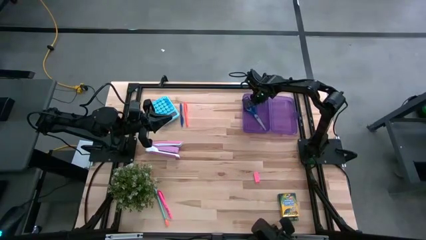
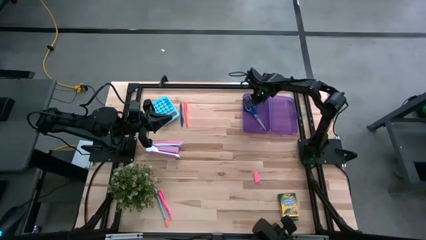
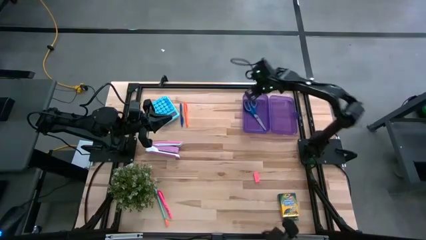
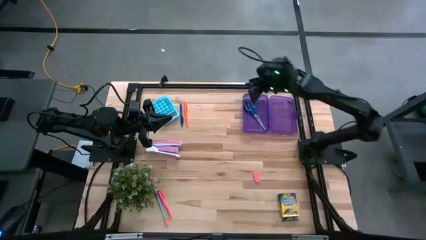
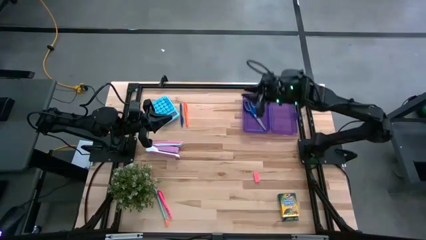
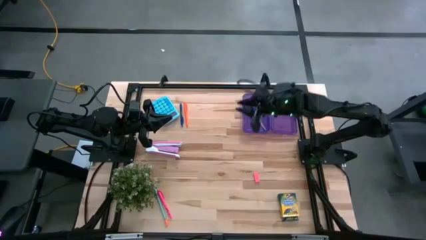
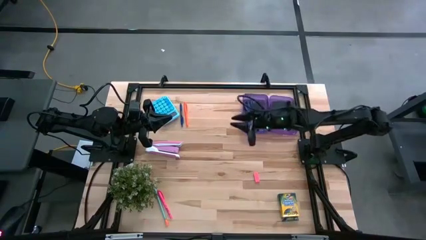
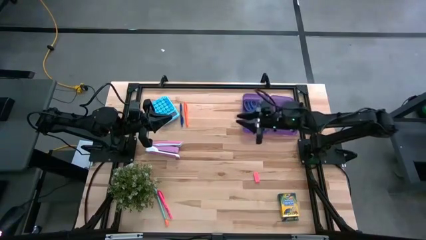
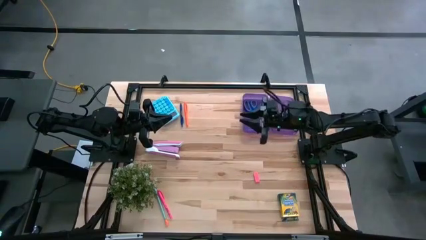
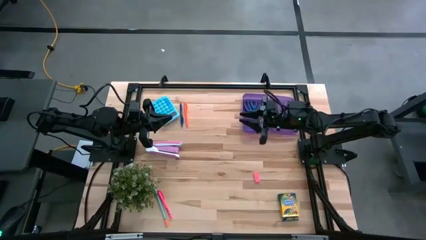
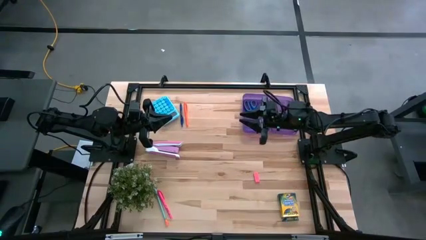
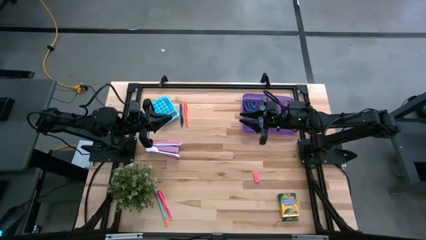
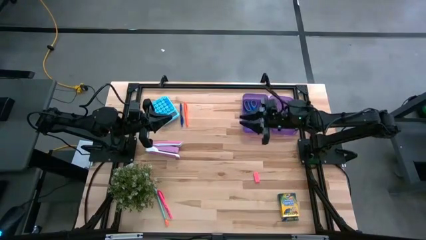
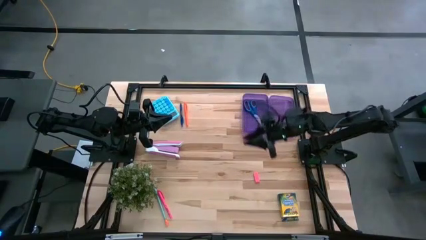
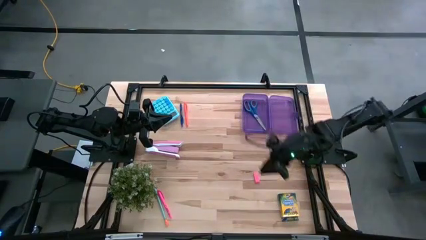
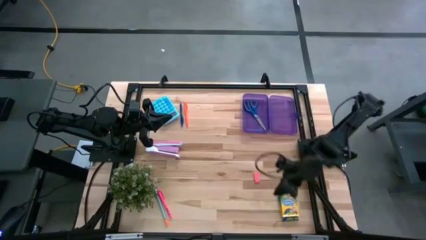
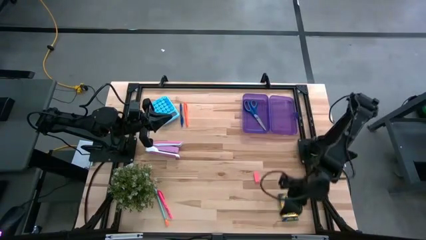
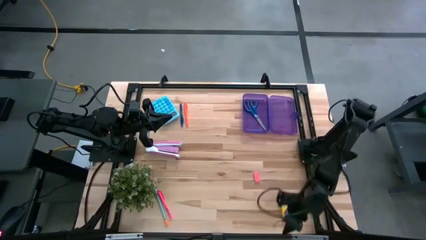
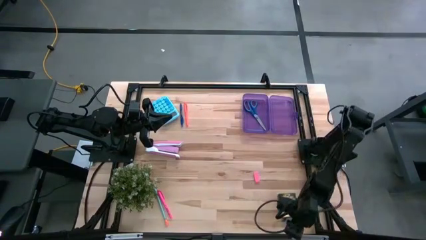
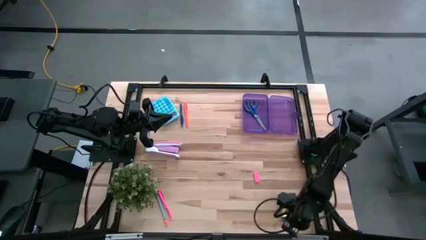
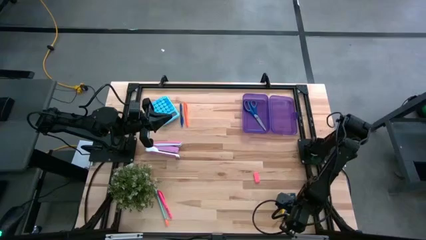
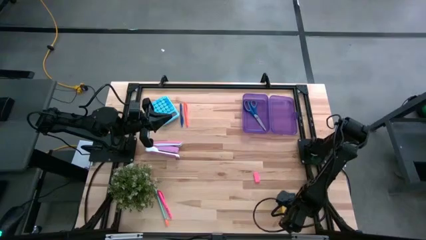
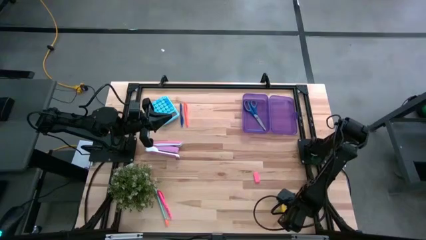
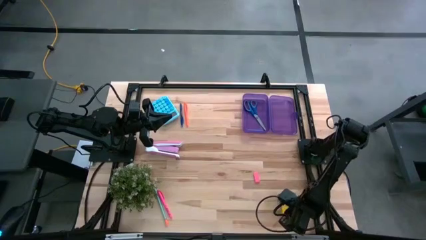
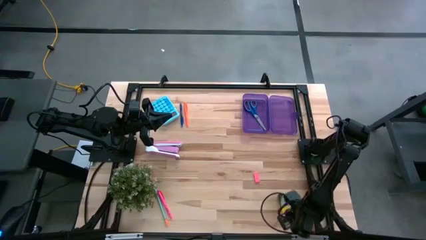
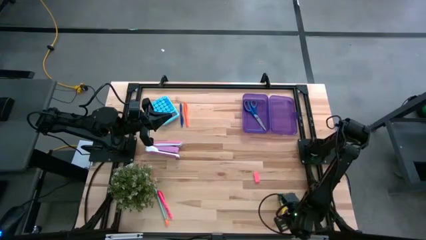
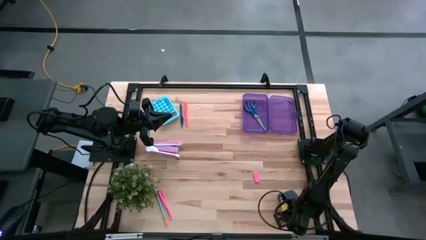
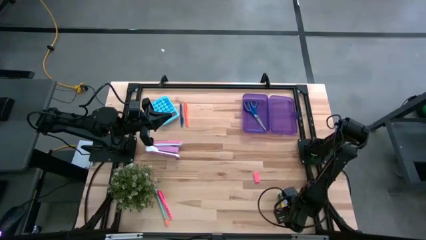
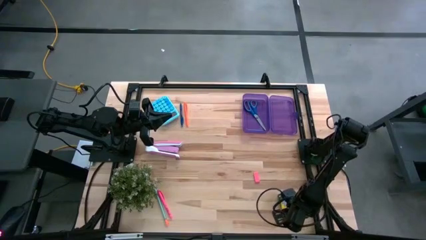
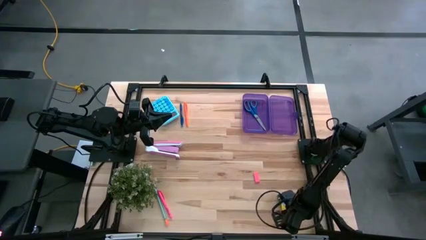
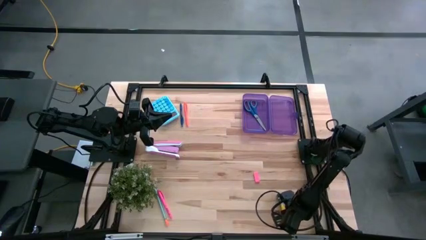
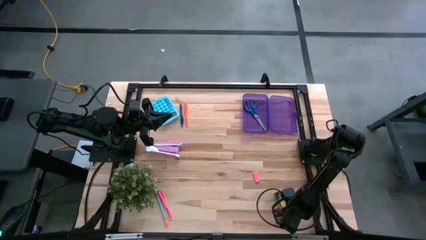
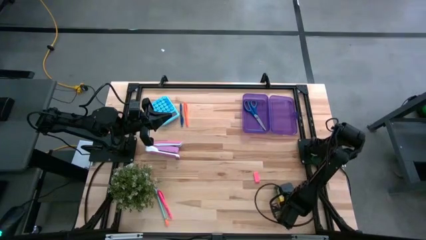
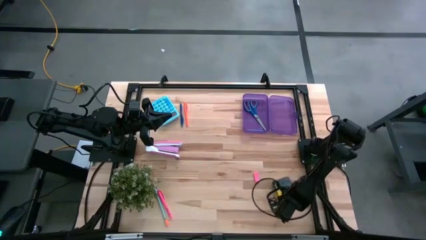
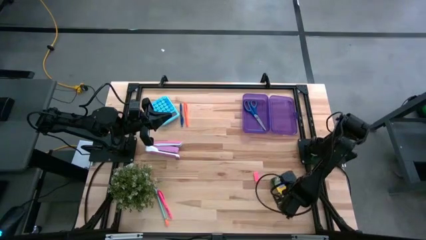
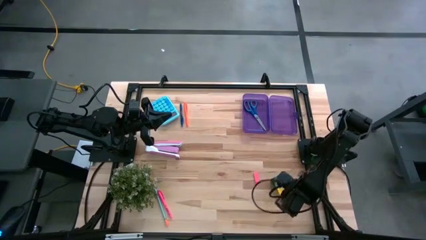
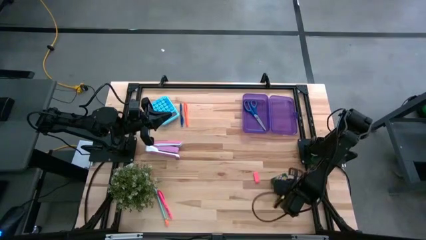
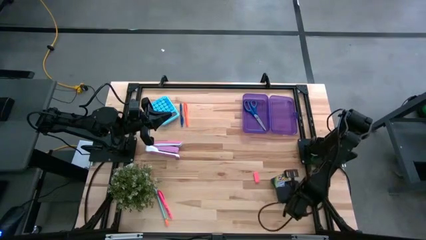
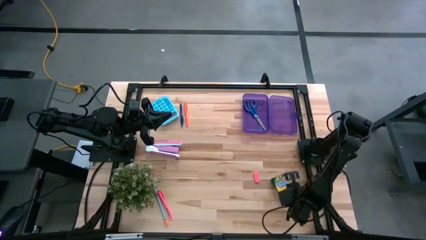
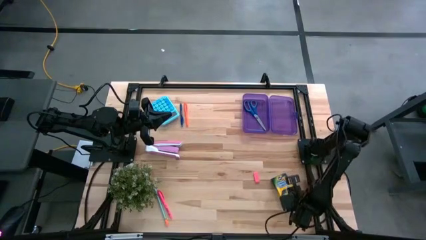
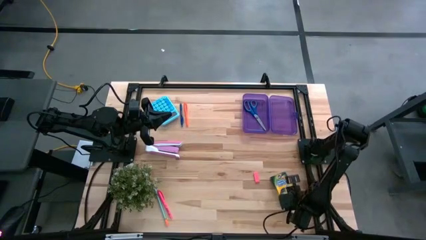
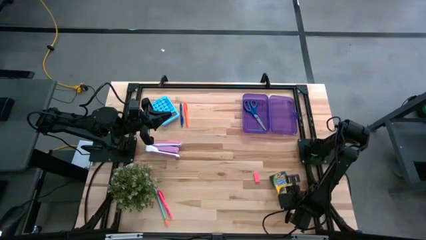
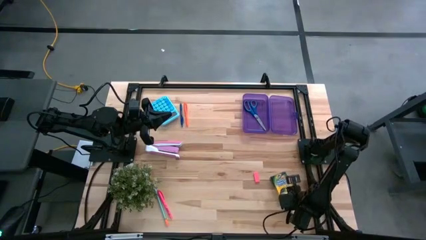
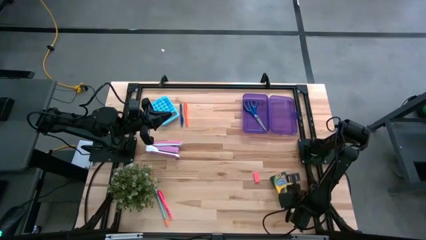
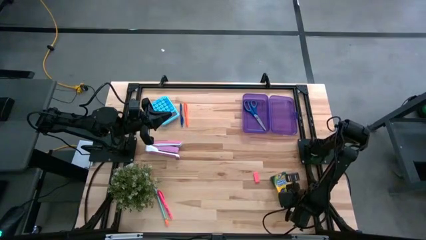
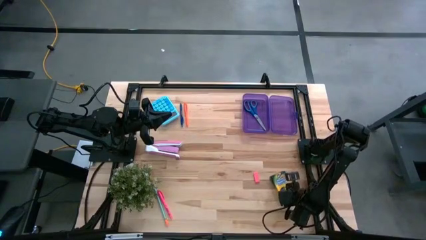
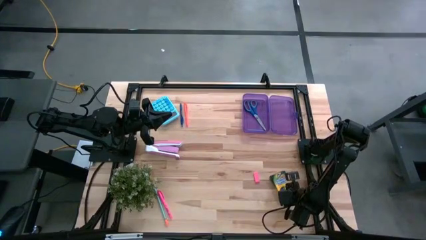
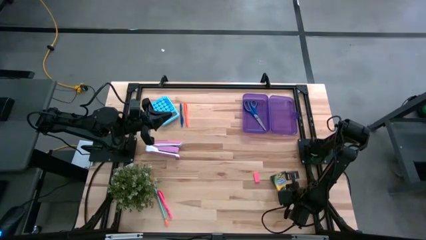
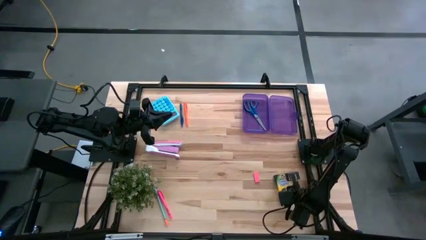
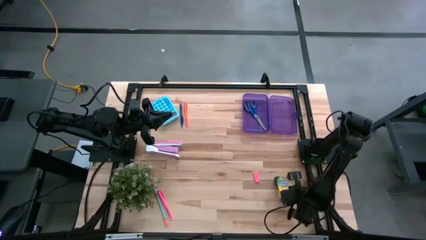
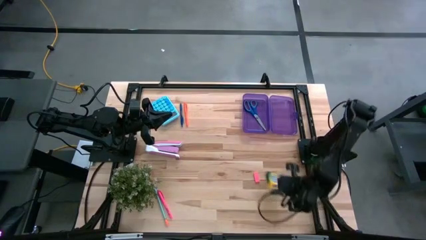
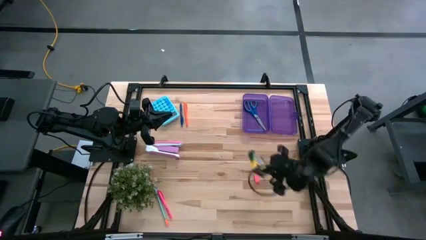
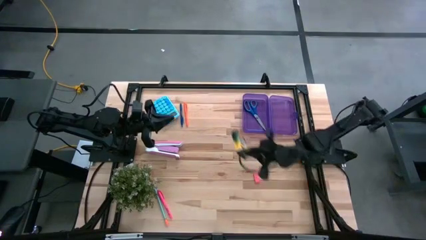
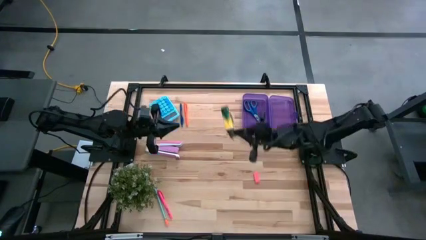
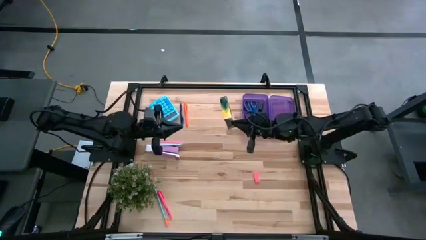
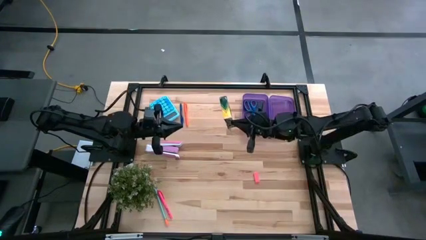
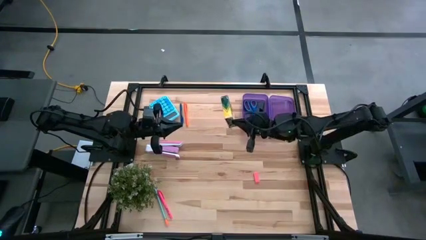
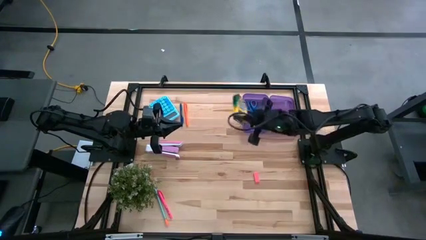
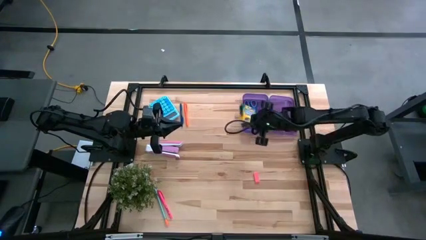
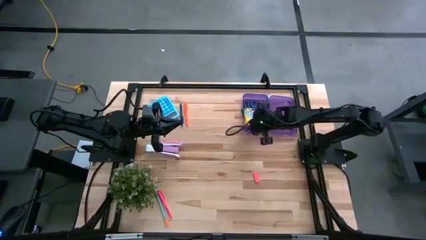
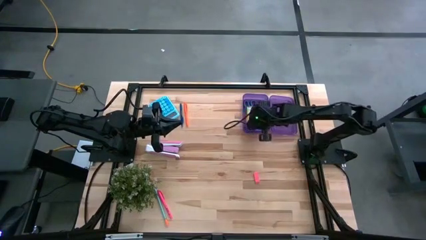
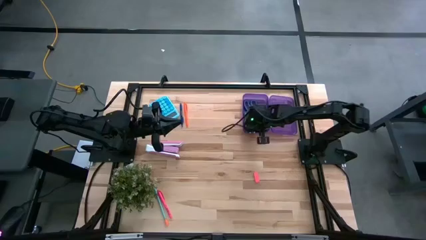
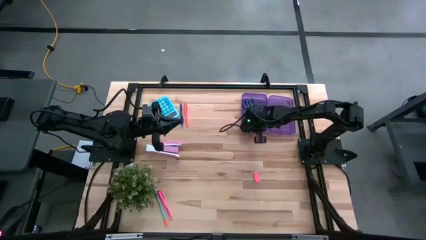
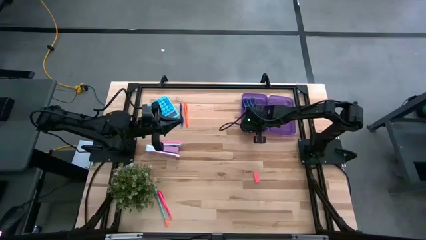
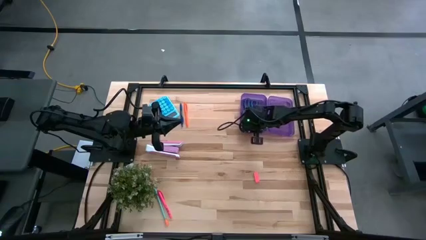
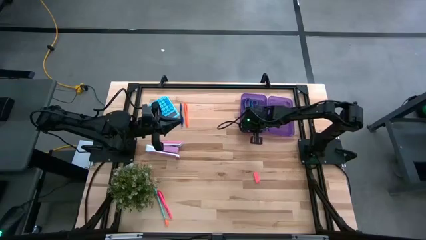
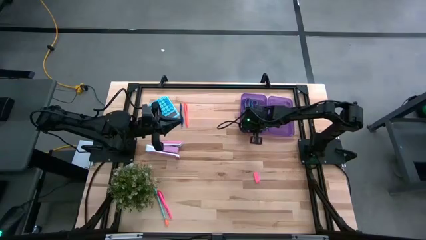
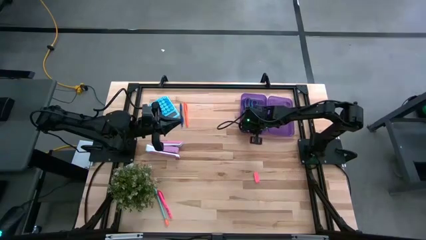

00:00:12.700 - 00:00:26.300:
Task: Pack school essentials
Put the yellow crayon box into the violet supply box
